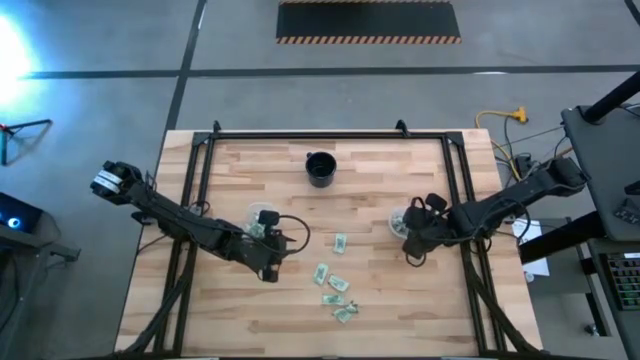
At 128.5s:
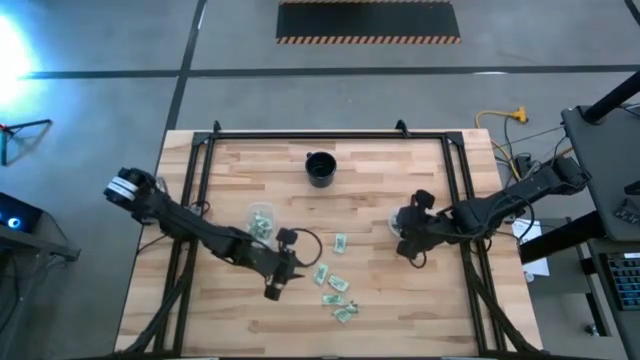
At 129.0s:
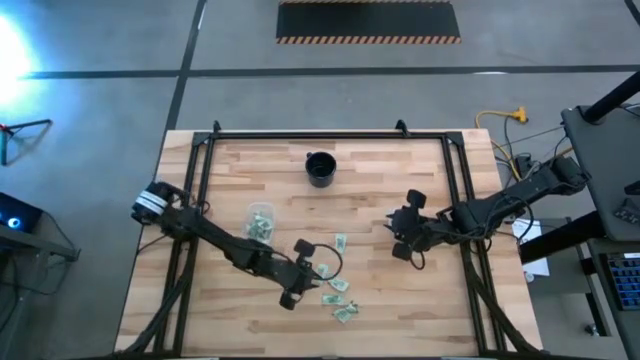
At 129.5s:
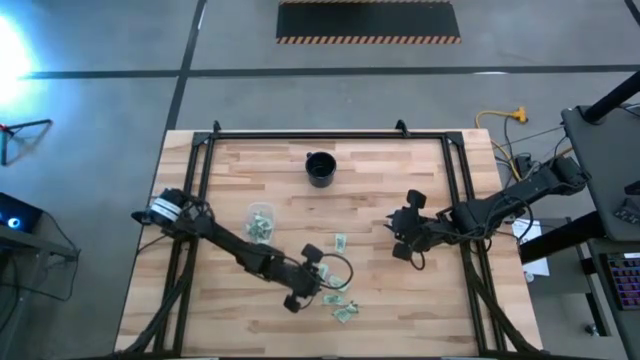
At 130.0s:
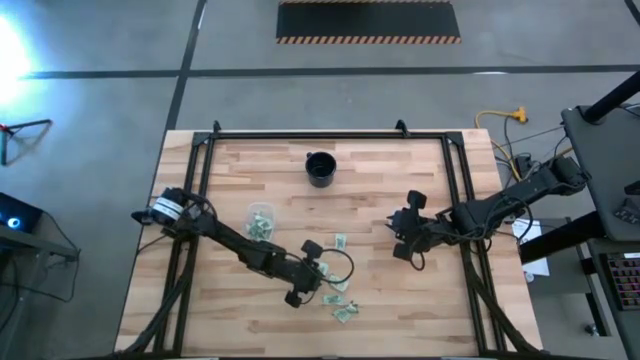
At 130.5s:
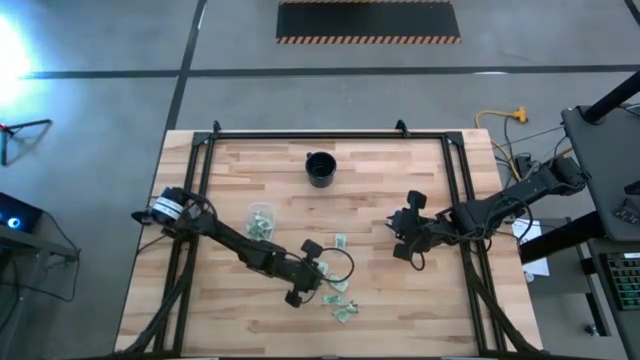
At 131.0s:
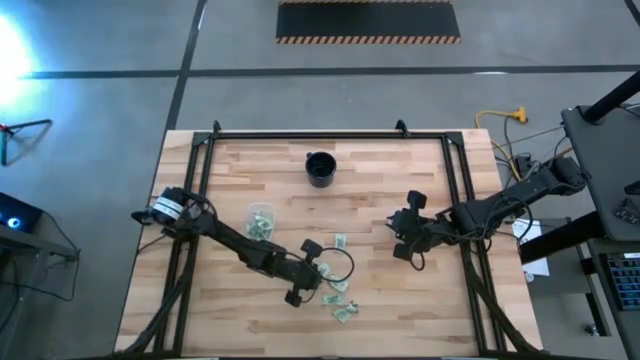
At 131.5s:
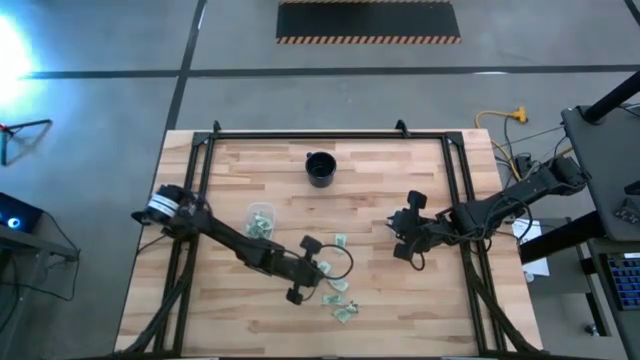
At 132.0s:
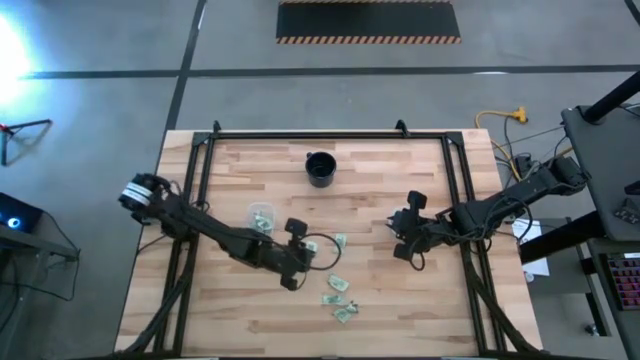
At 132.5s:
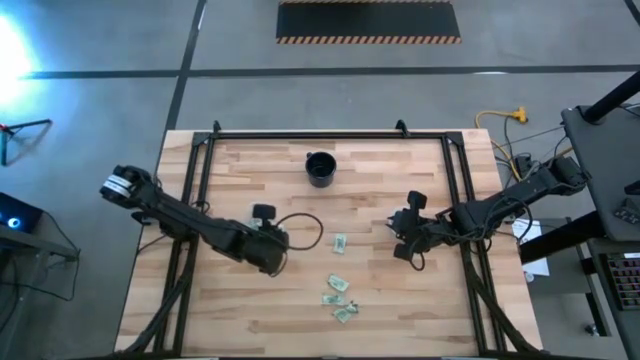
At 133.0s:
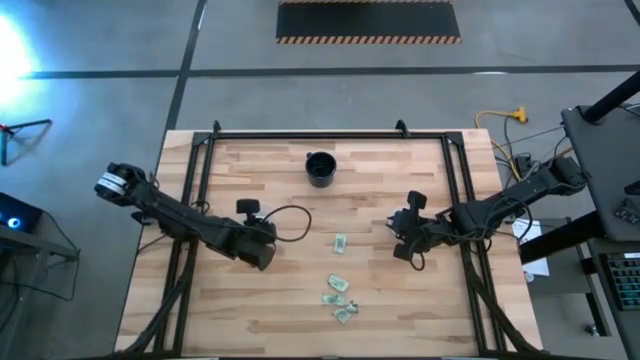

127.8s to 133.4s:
Task: Pick and place Stevia / Truvia into bins
Put the light green stevia packet into the rectangular container

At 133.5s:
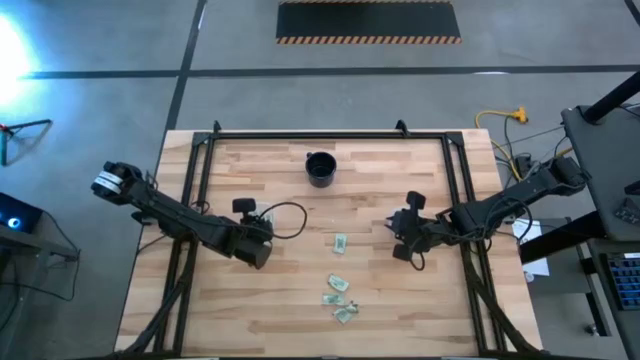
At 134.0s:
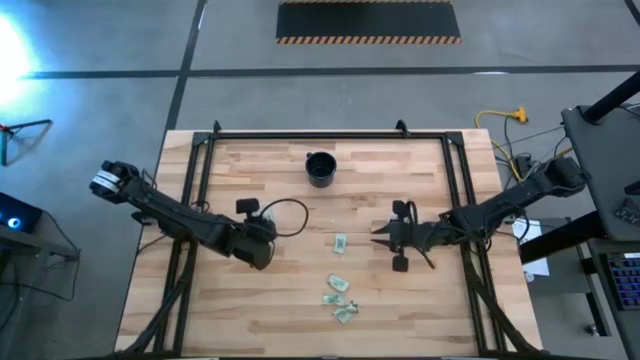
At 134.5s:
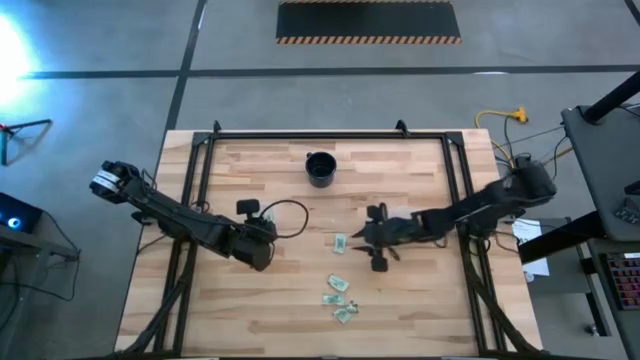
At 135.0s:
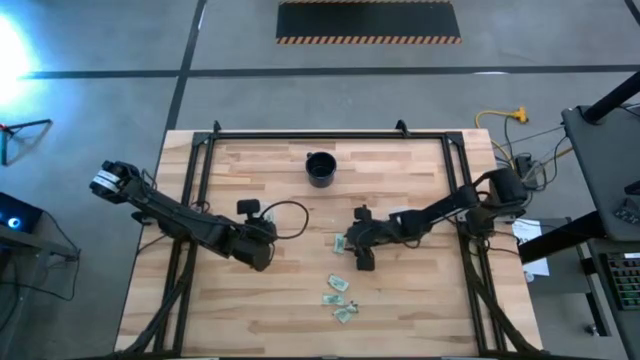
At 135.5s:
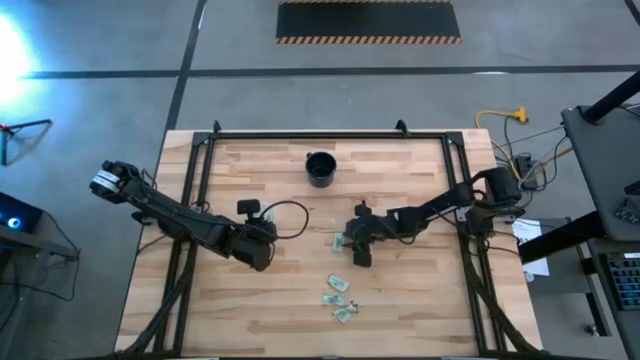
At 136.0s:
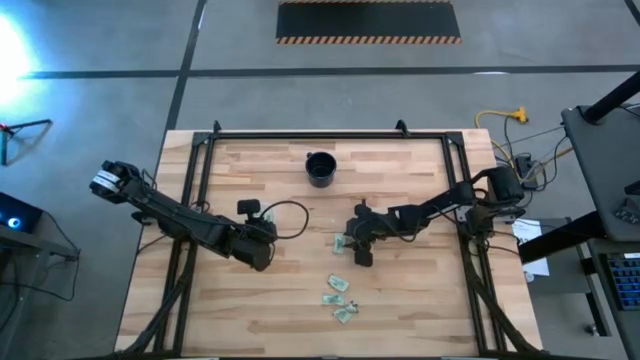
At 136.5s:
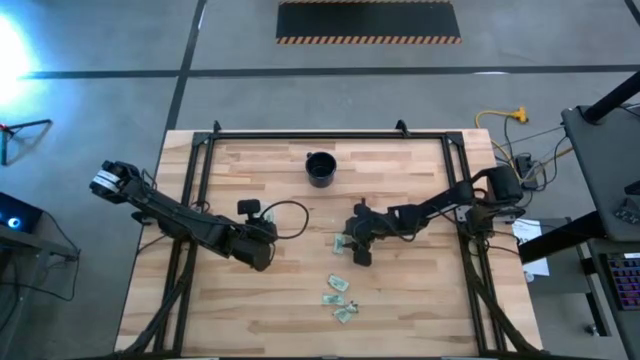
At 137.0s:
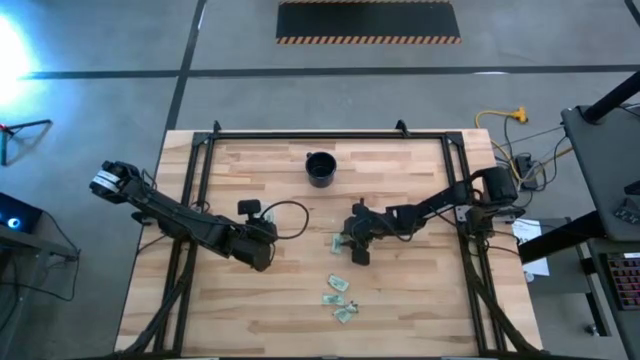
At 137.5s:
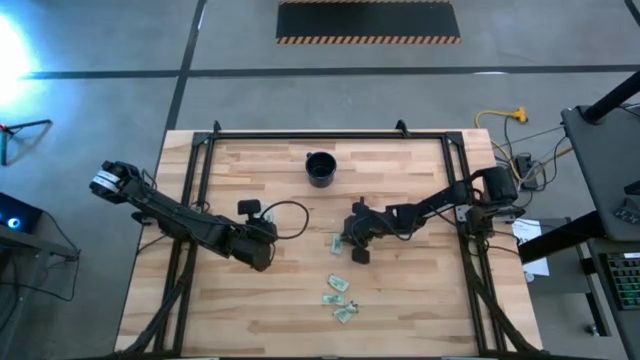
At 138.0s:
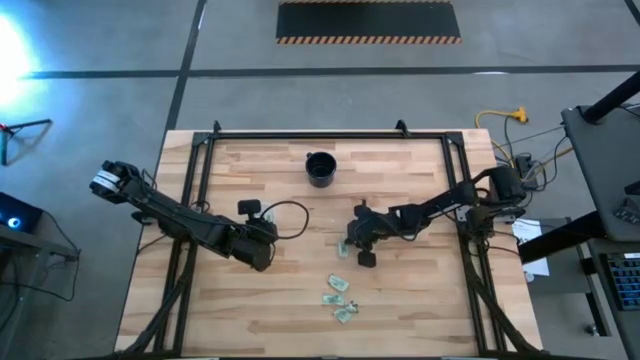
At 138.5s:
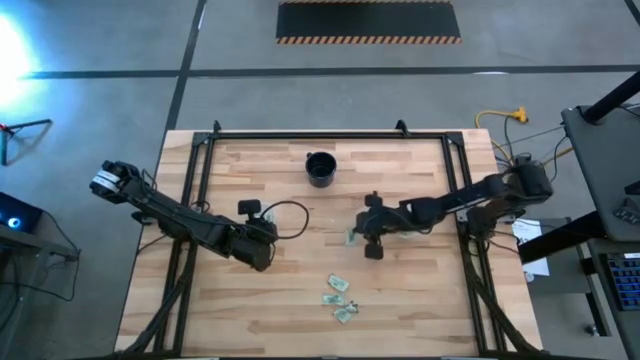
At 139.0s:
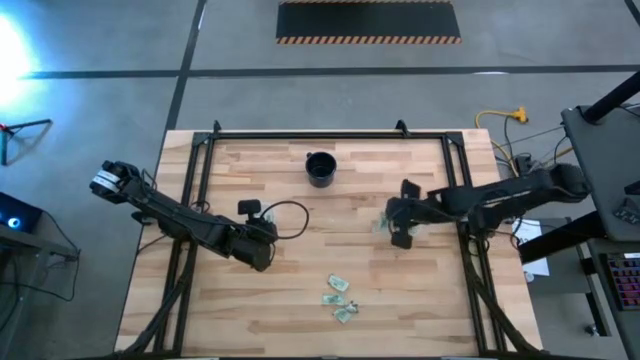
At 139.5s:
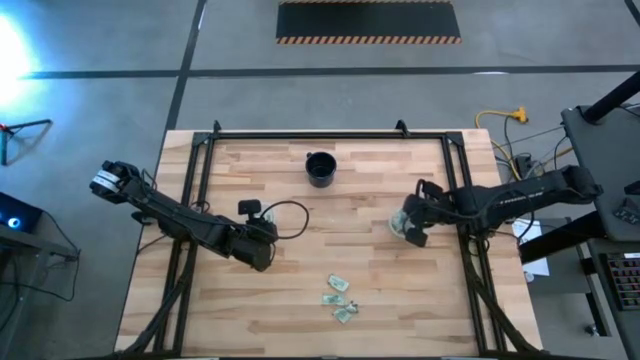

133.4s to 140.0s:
Put the light green stevia packet into the circular container

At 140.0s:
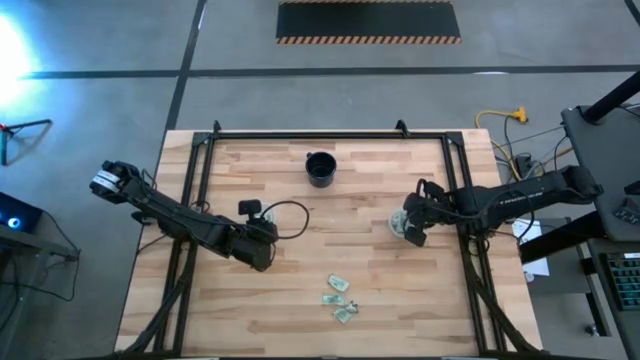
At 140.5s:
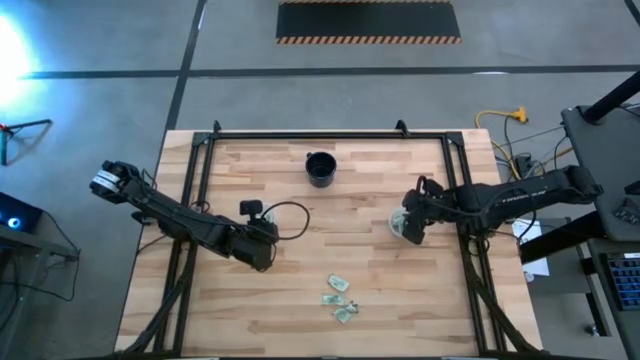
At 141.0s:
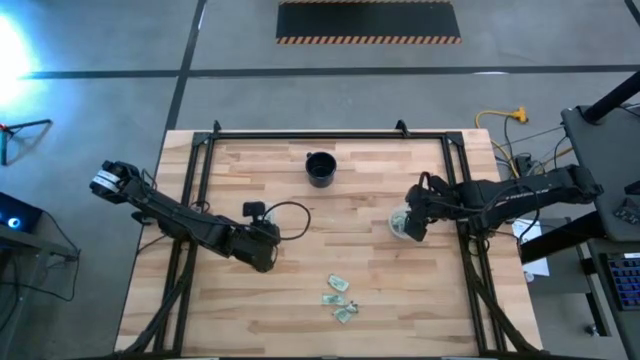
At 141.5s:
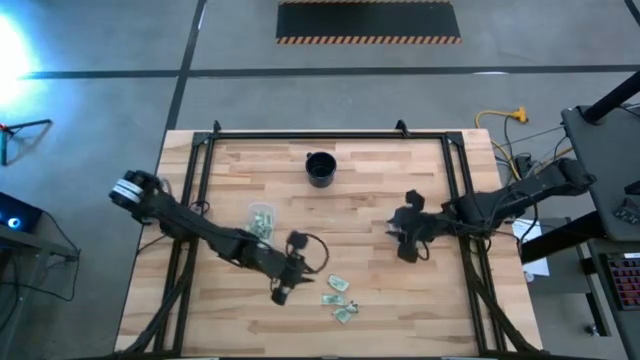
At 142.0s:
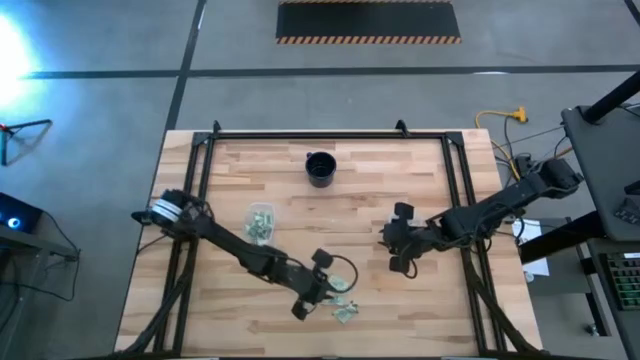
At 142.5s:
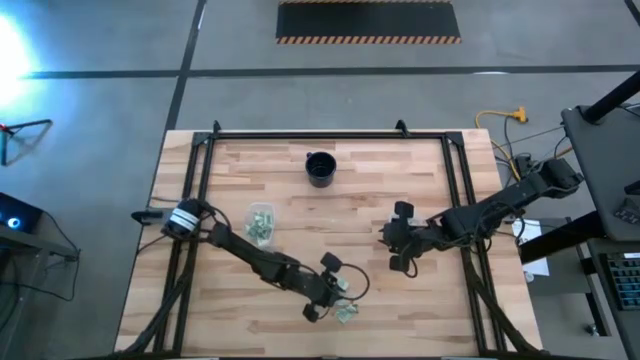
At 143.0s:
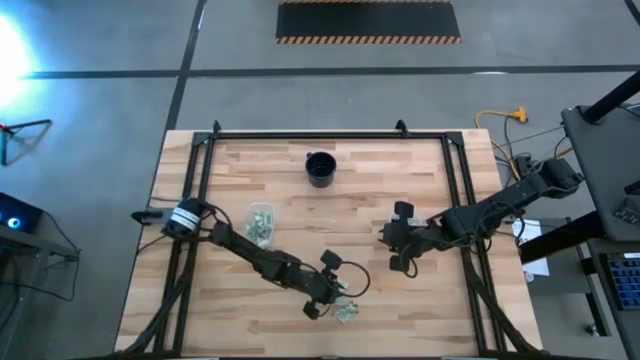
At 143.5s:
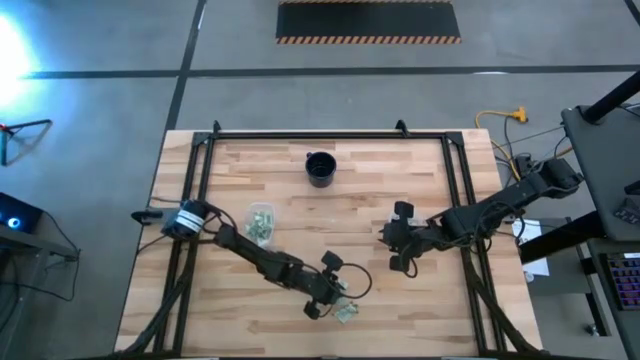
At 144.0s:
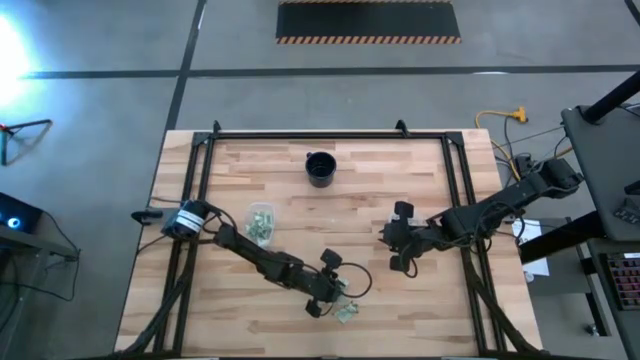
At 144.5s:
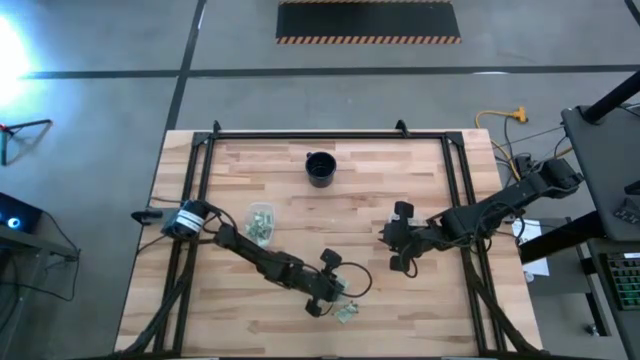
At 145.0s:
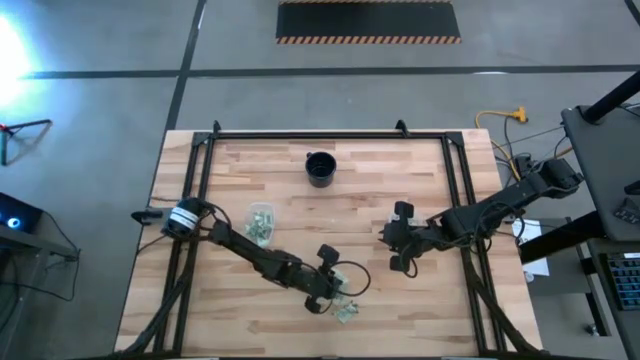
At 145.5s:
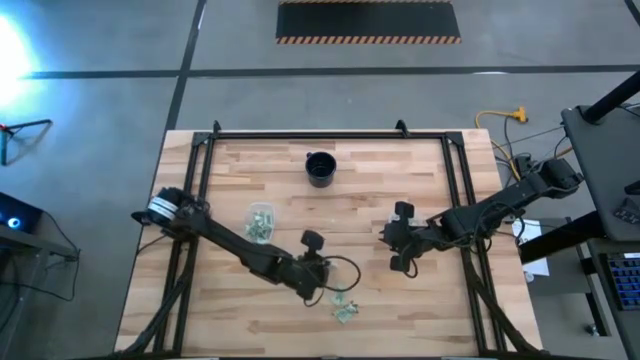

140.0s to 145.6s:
Put the light green stevia packet into the rectangular container

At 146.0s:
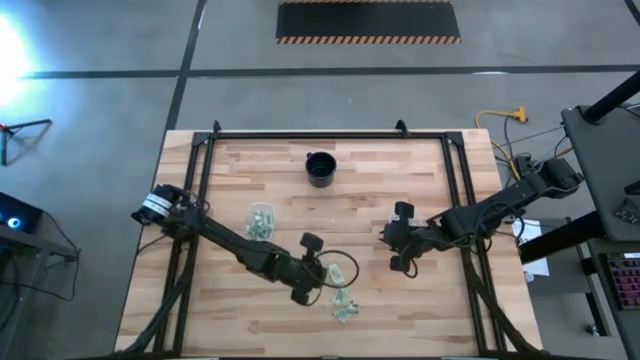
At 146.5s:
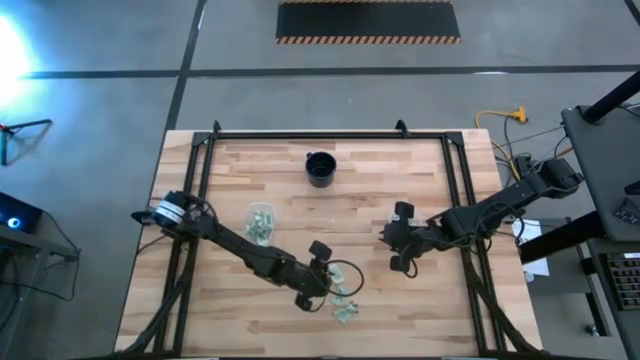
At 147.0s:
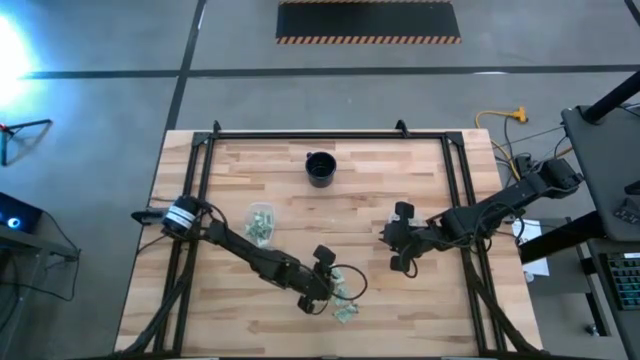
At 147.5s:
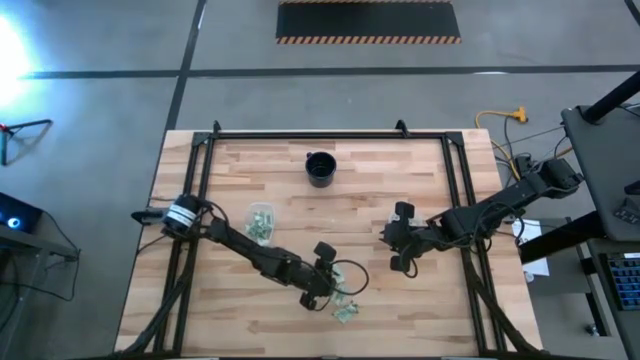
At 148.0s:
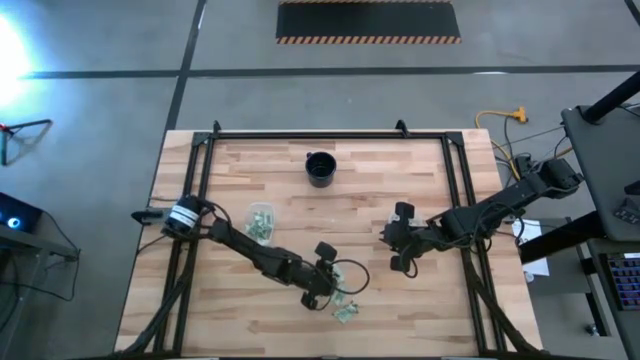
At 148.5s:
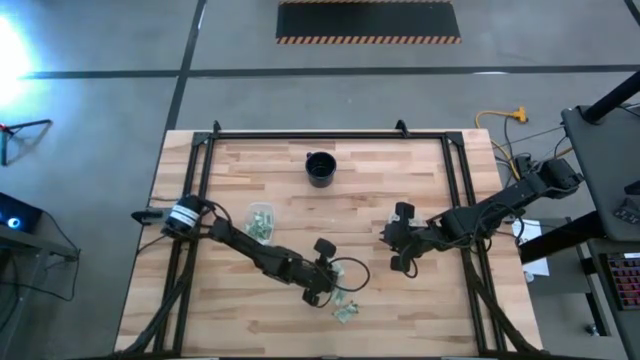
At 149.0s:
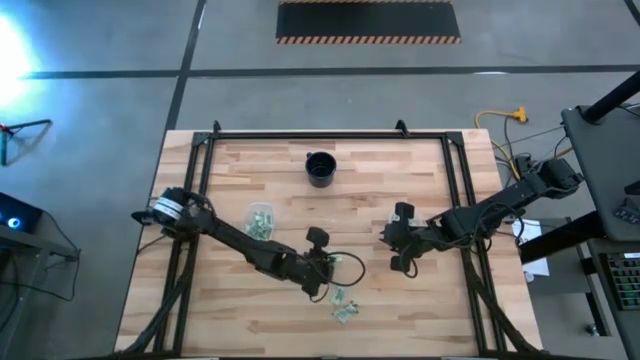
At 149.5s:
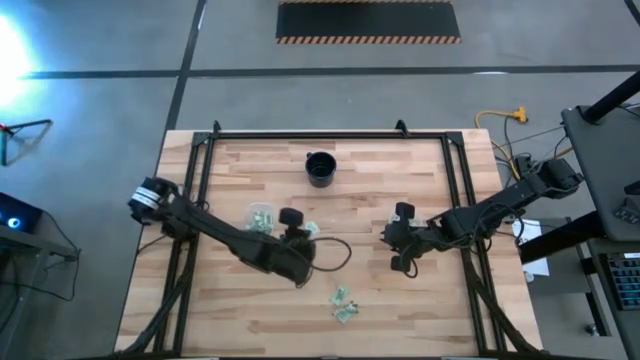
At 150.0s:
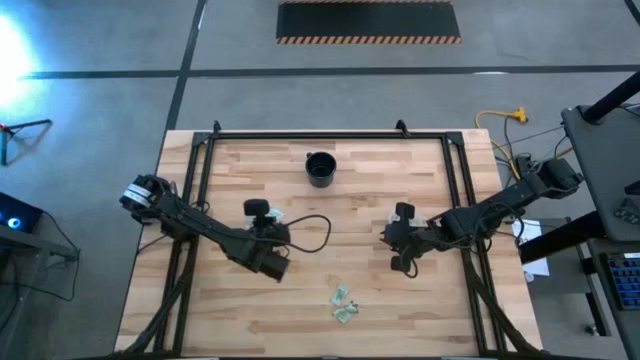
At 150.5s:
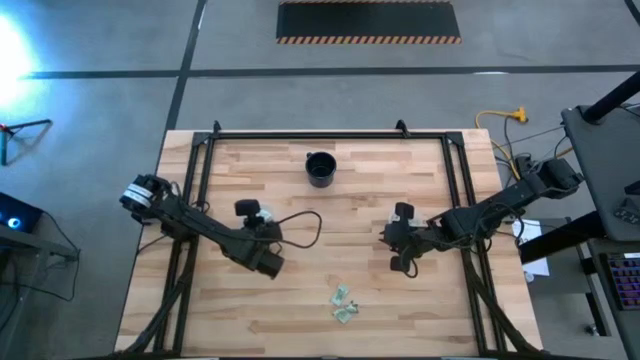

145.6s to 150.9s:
Put the top light green stevia packet into the rectangular container
